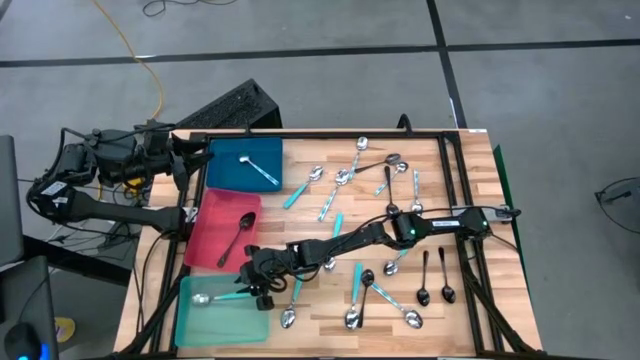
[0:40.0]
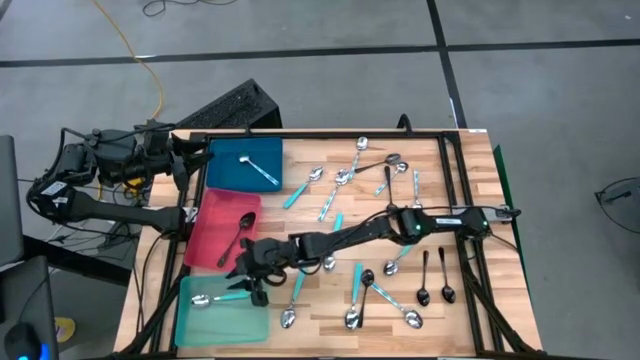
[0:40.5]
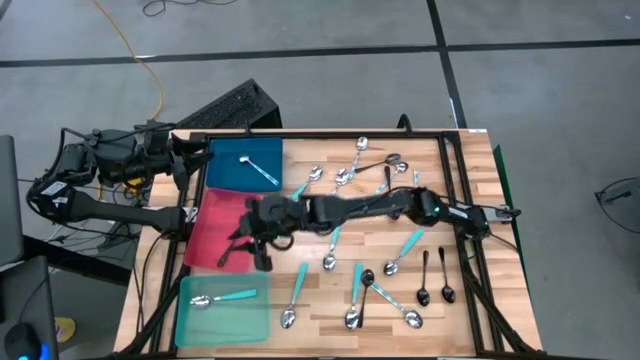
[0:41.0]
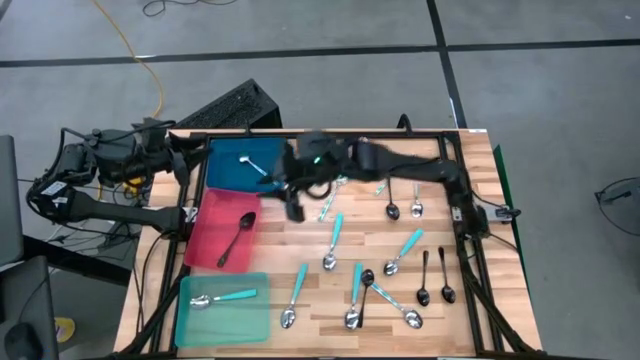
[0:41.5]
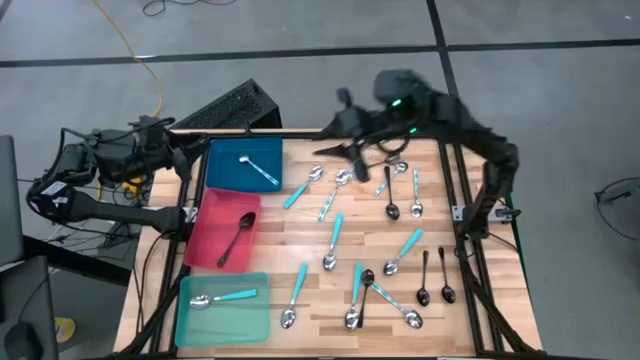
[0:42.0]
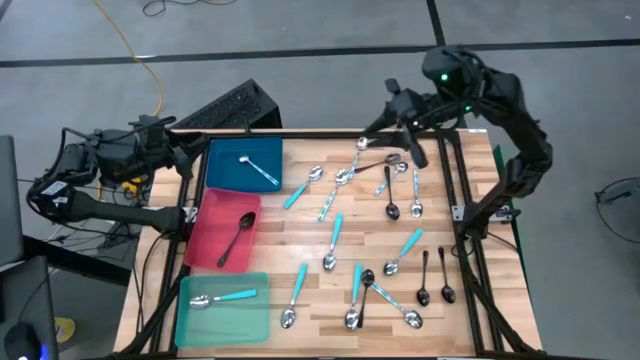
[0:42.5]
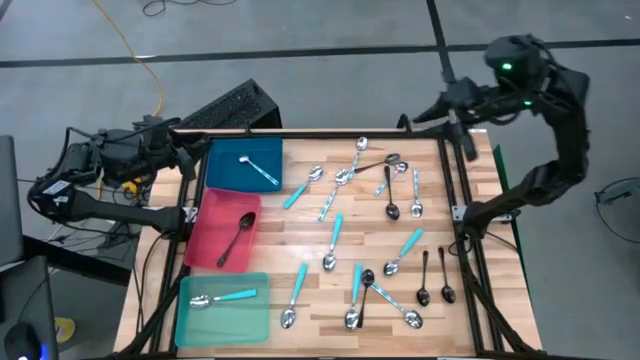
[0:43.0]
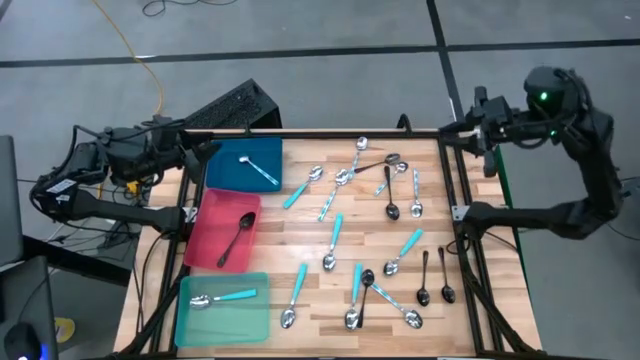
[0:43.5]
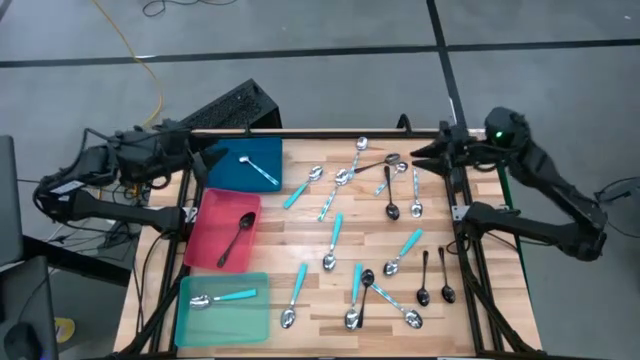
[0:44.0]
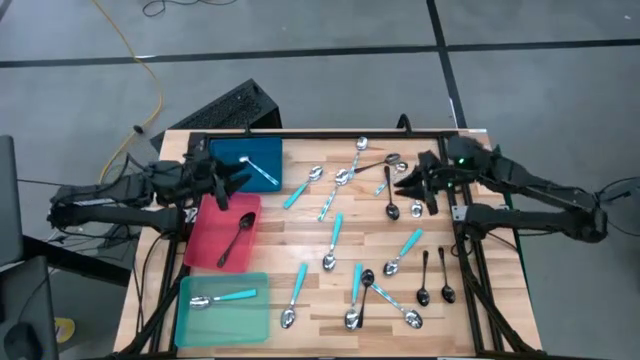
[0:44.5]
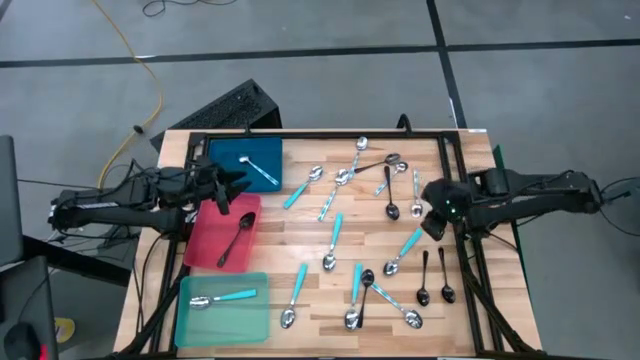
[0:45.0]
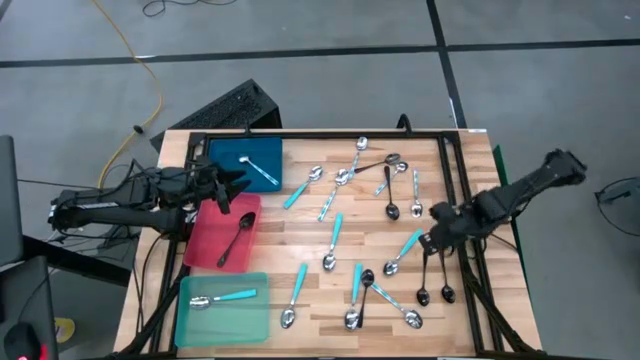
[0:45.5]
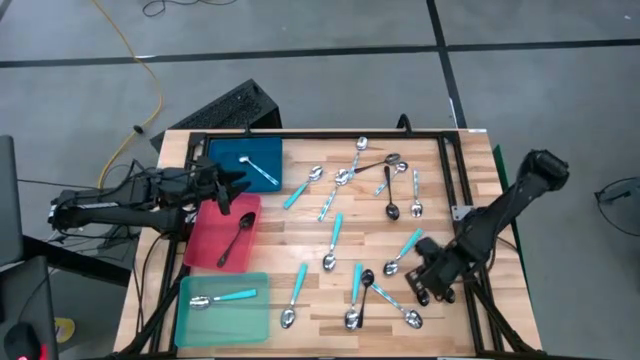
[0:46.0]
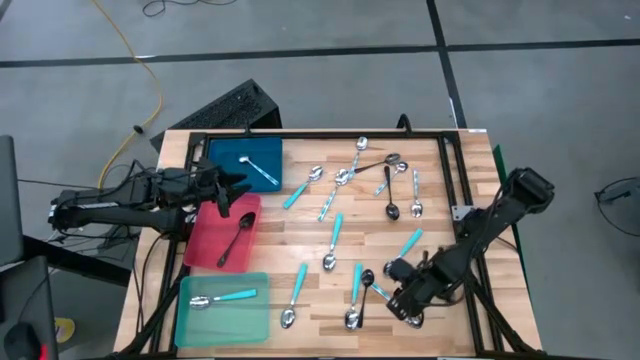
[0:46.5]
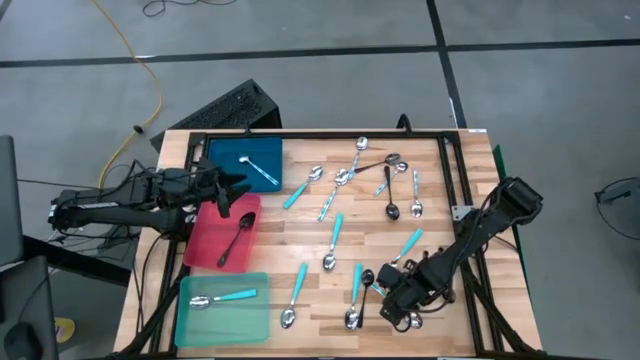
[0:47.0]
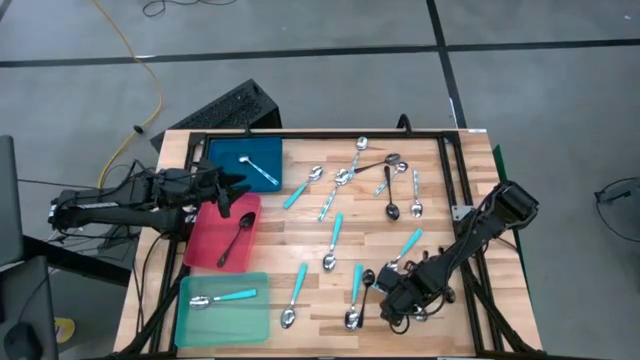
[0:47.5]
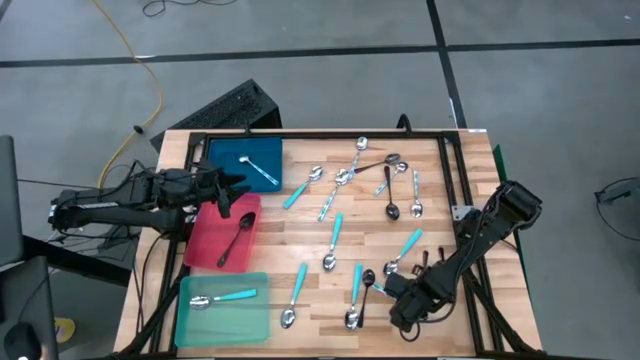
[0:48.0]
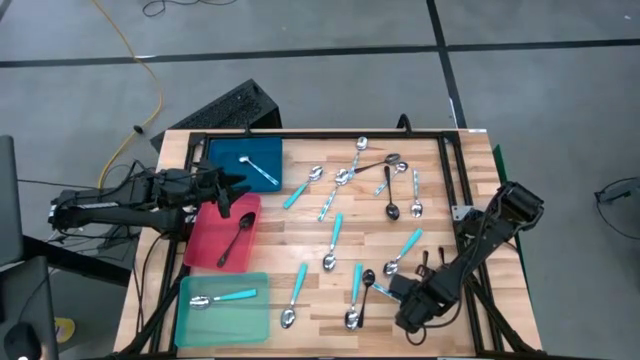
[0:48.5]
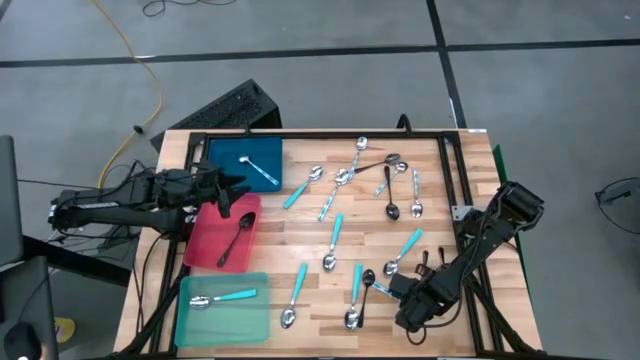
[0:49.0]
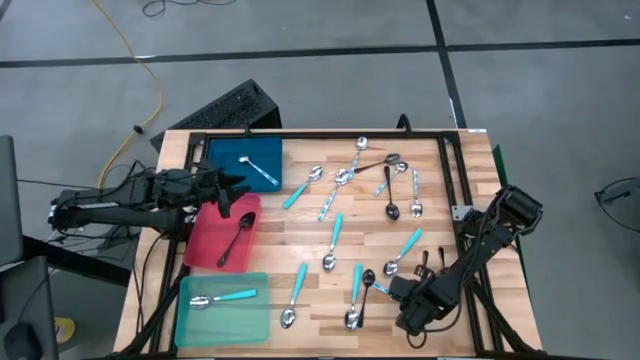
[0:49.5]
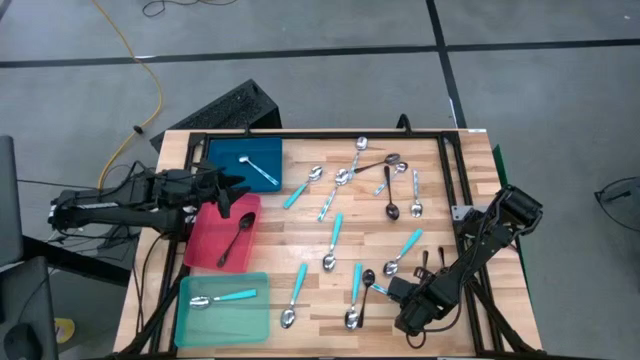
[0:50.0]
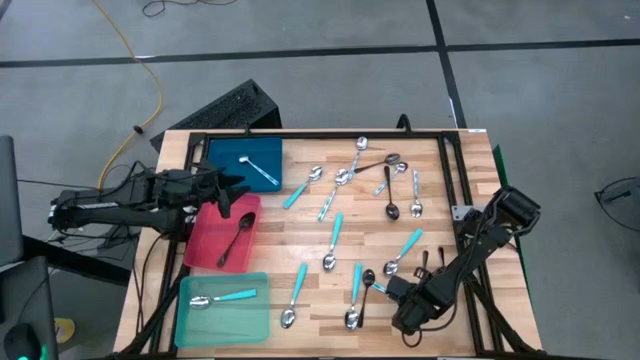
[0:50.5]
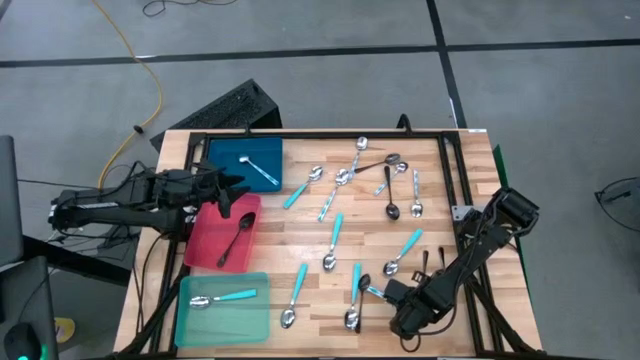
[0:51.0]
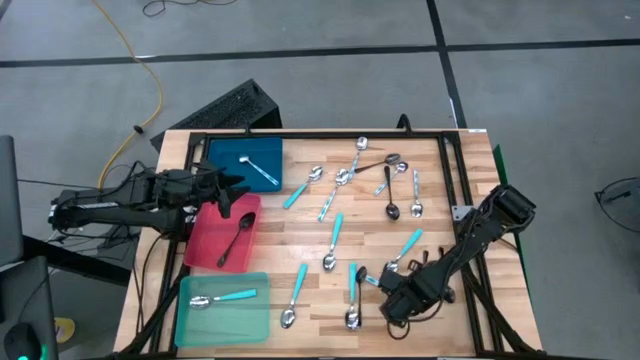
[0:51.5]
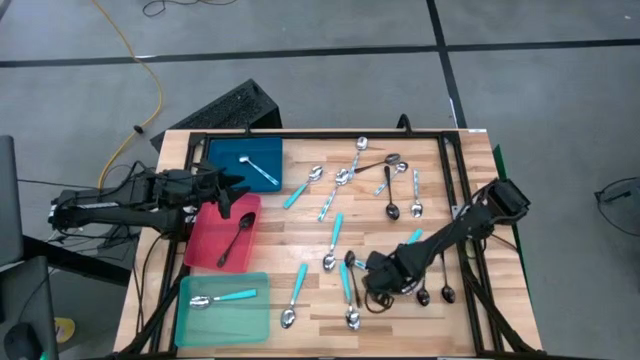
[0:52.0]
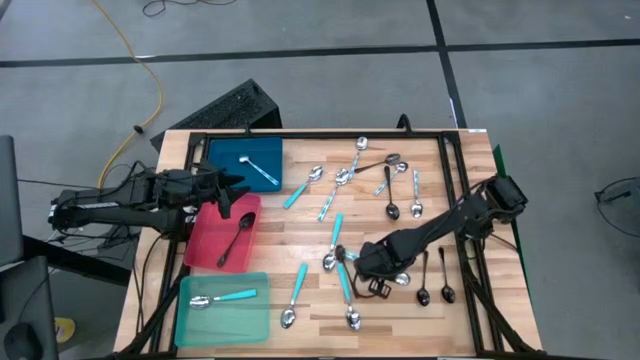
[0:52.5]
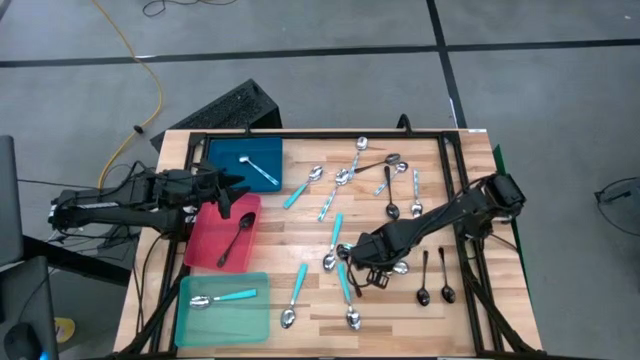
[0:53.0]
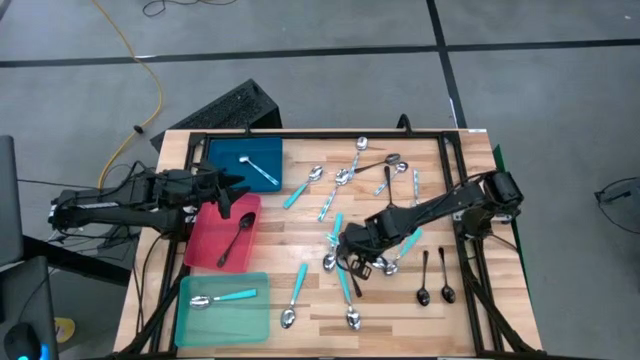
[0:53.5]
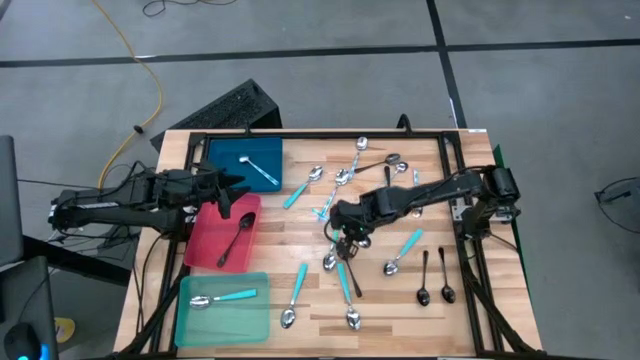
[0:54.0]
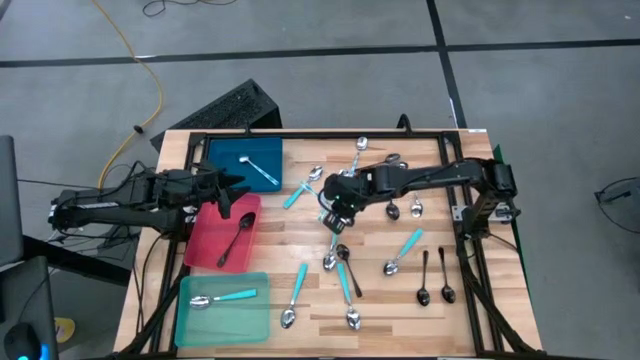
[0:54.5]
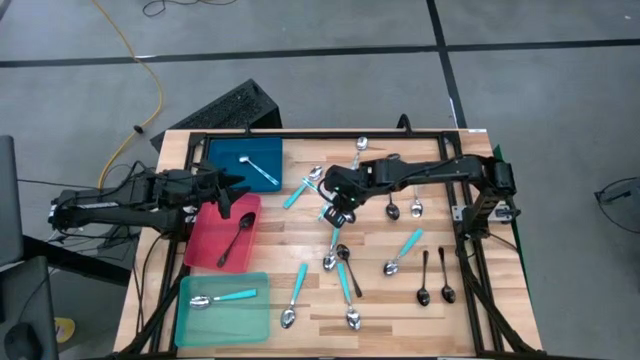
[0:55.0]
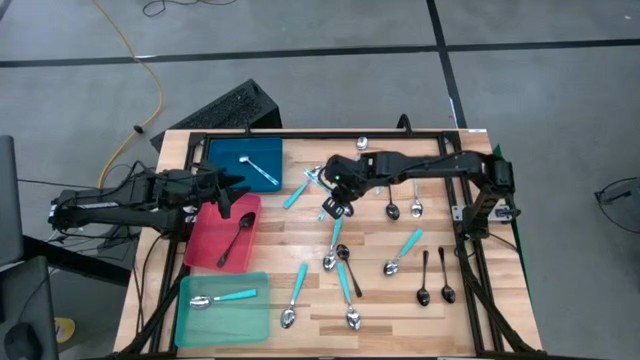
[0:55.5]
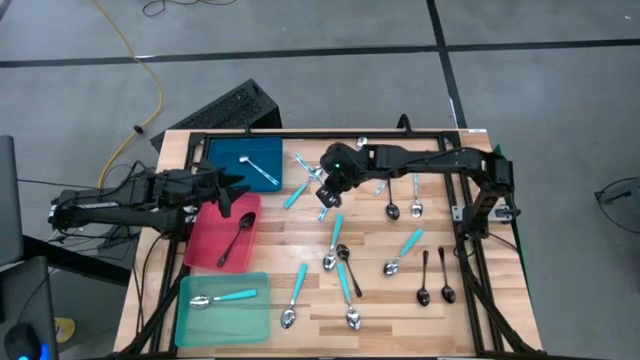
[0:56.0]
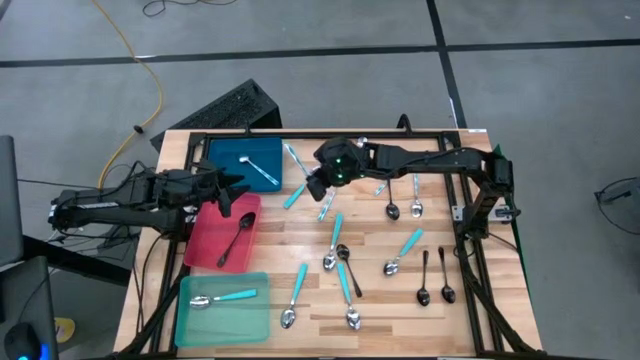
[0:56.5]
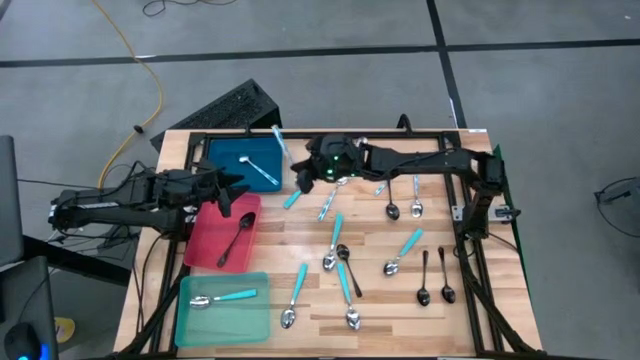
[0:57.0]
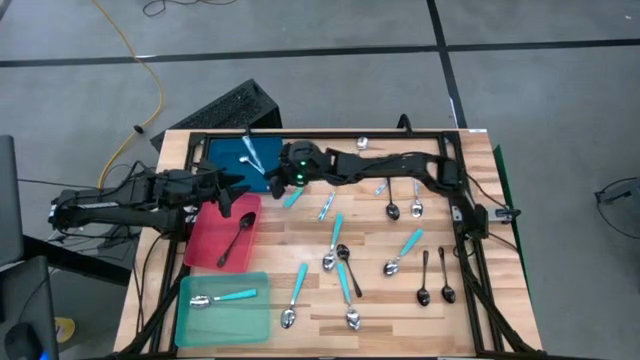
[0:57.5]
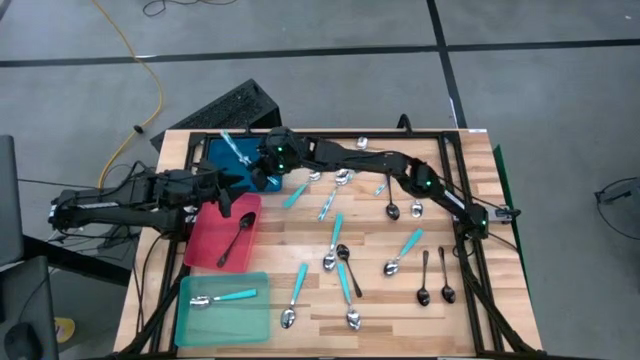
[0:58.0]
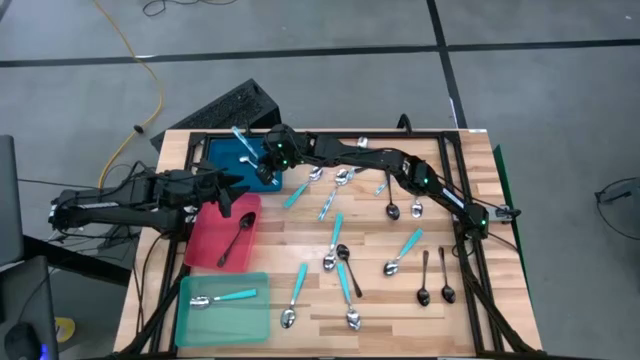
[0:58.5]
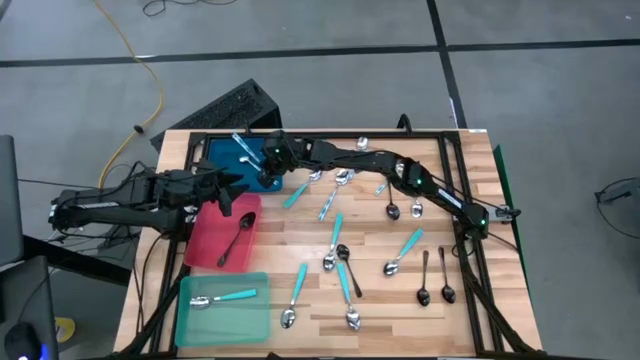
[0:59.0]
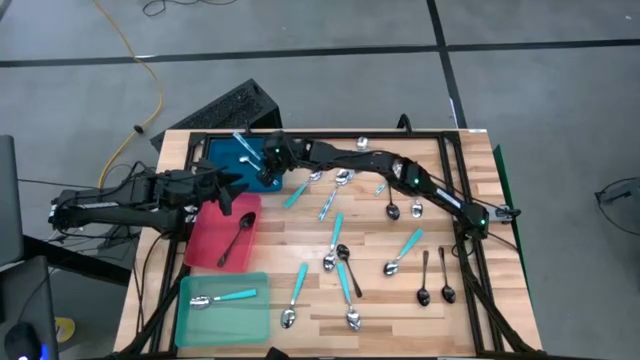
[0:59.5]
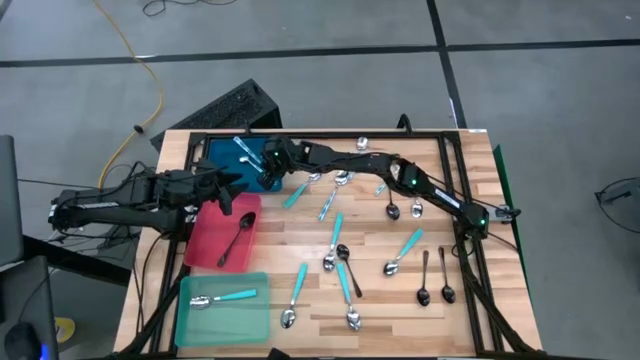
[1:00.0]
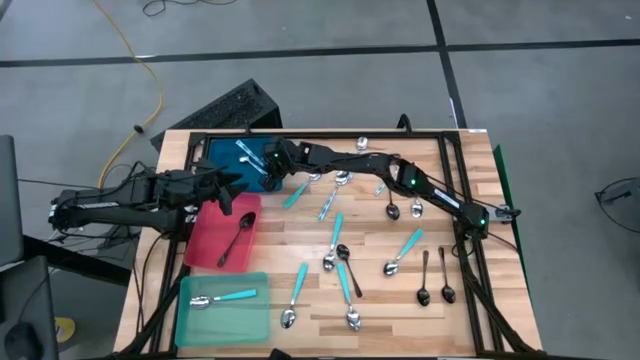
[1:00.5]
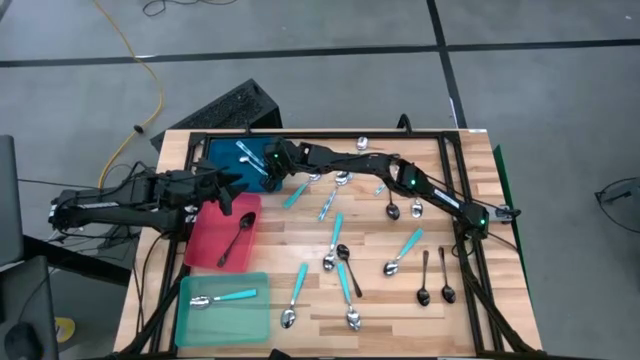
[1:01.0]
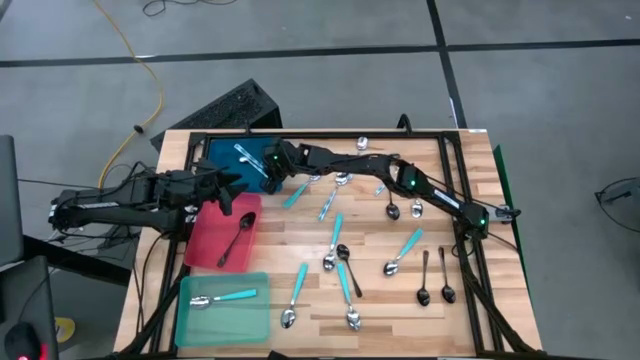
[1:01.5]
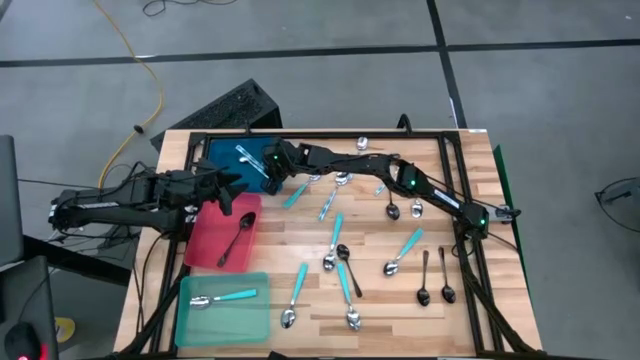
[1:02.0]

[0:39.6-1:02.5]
Task: Sort silverware by color (type)
Put the blue patterned spoon into the blue bin
